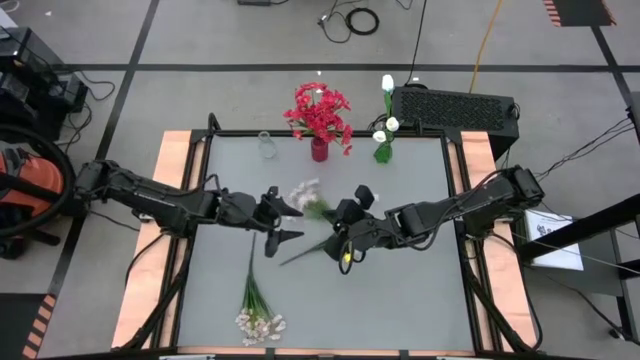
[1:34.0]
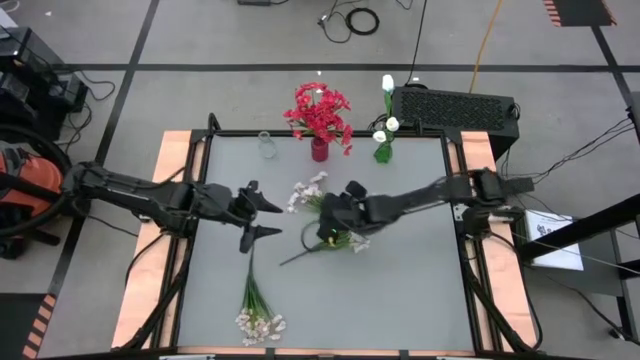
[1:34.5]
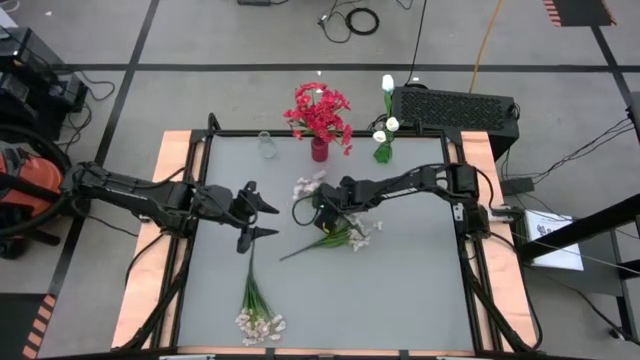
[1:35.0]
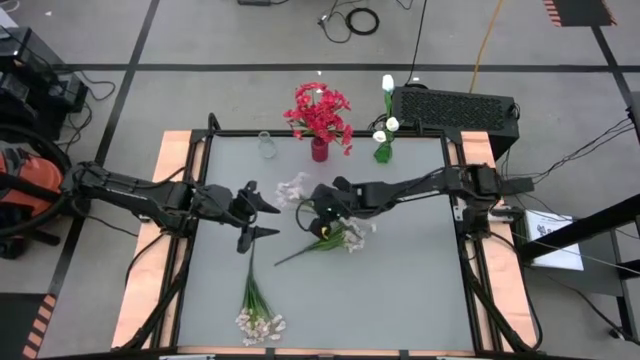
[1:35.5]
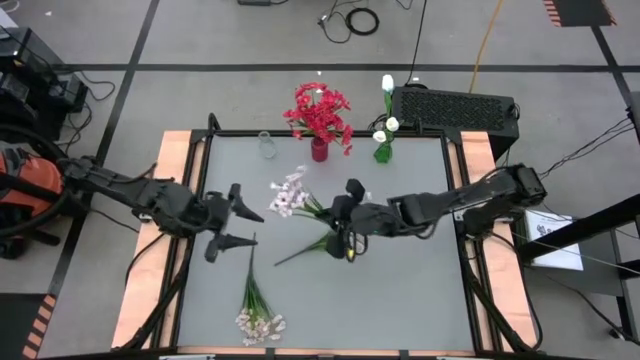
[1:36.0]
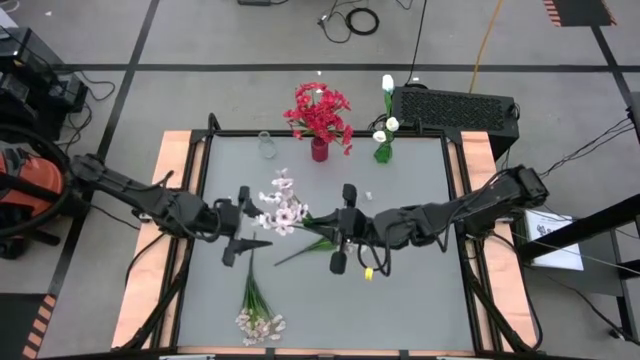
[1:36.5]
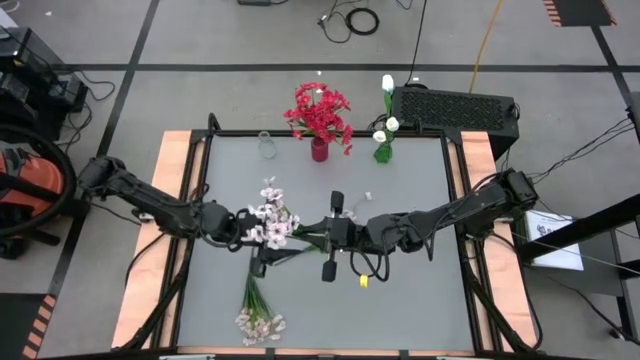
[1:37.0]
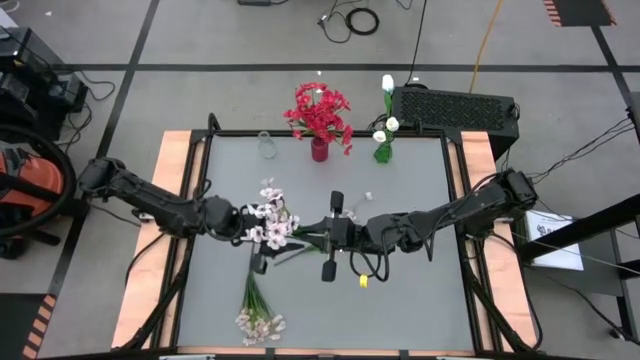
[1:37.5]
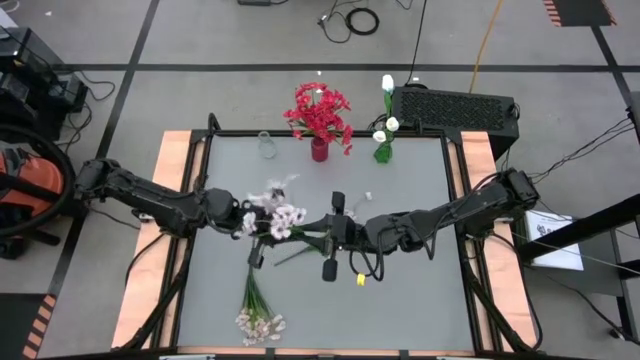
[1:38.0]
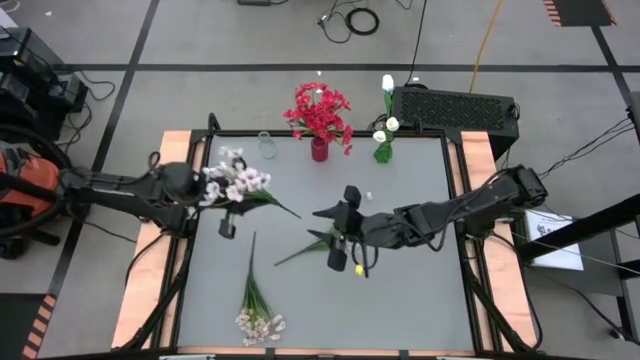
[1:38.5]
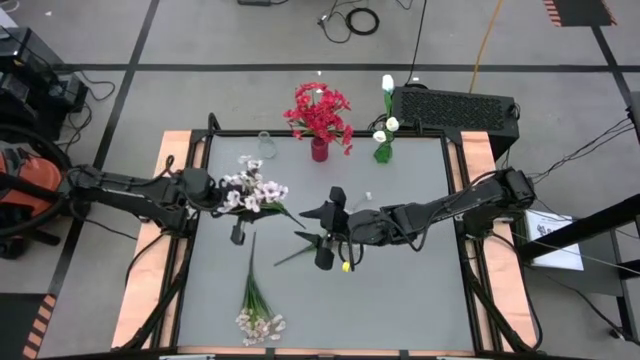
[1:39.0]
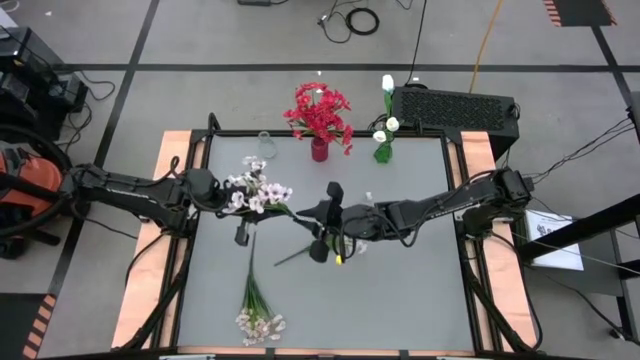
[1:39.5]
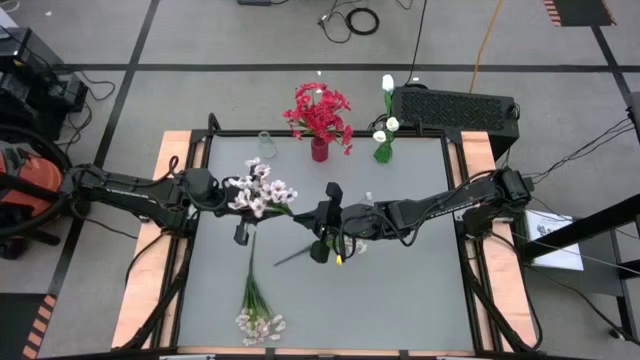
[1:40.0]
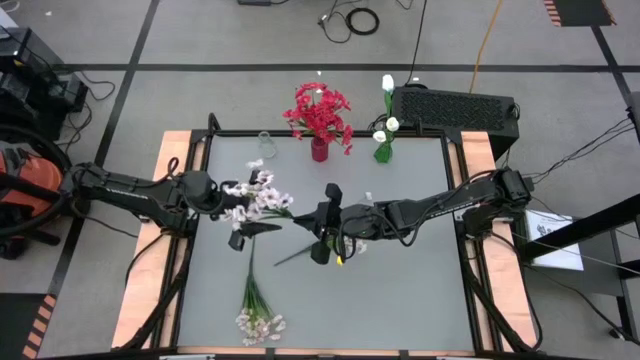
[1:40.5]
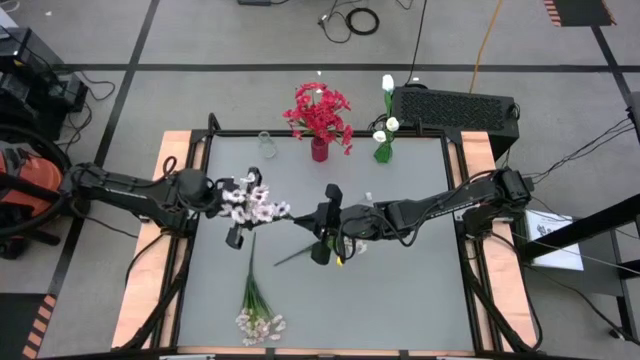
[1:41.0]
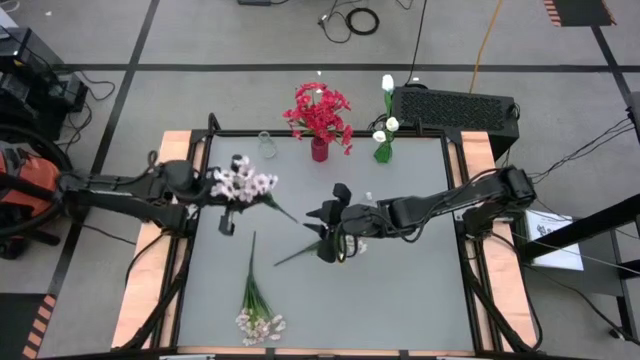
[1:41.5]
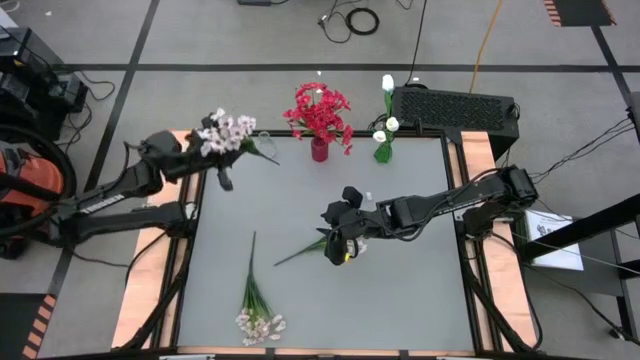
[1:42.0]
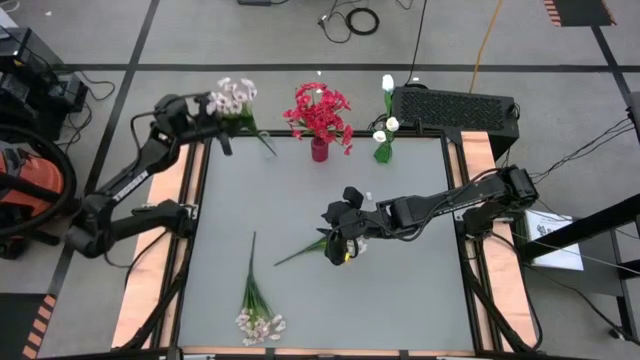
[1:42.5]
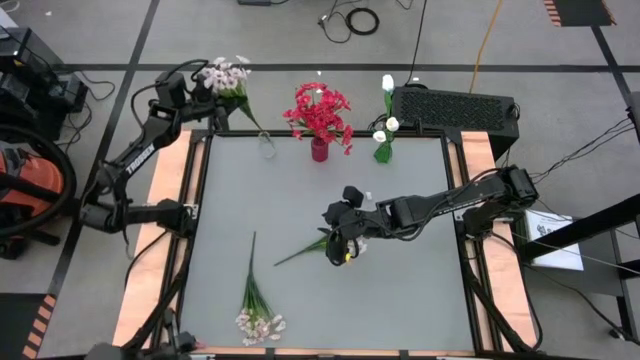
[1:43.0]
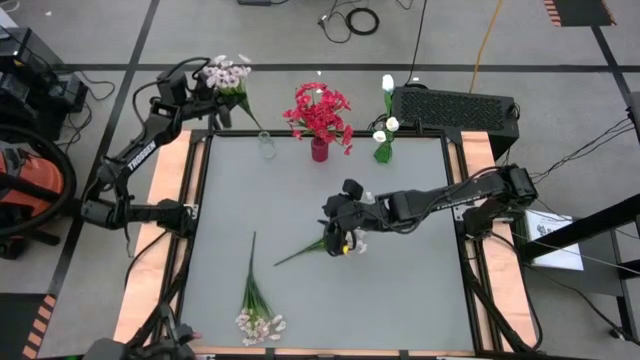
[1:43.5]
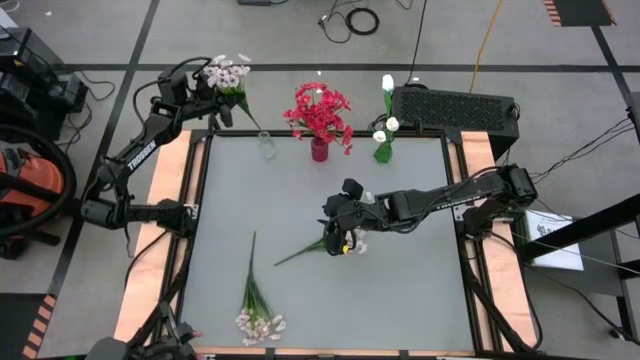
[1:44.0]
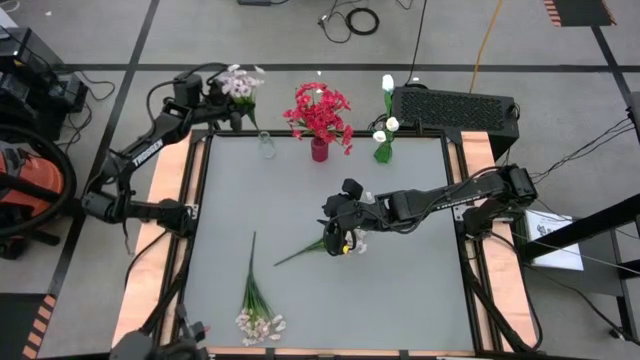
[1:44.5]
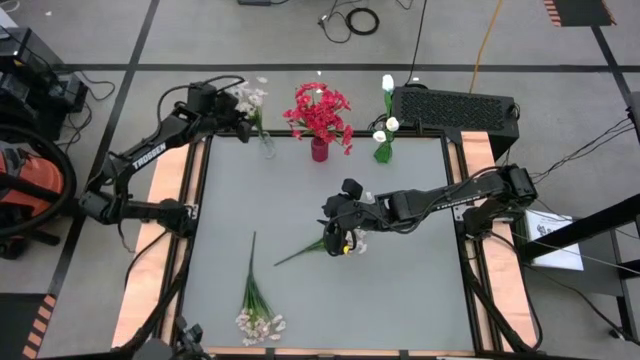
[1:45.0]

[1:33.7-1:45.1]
Task: Sort flowers into vase by color
Put the top white flowers into the transparent vase

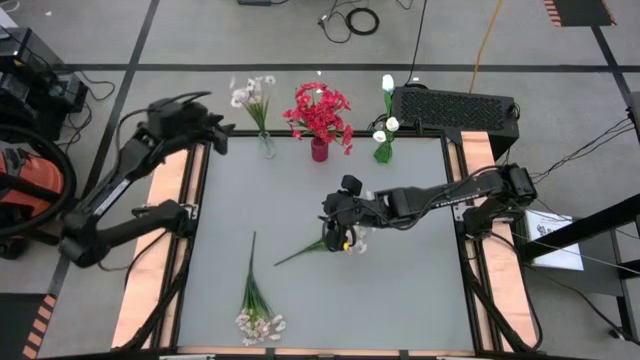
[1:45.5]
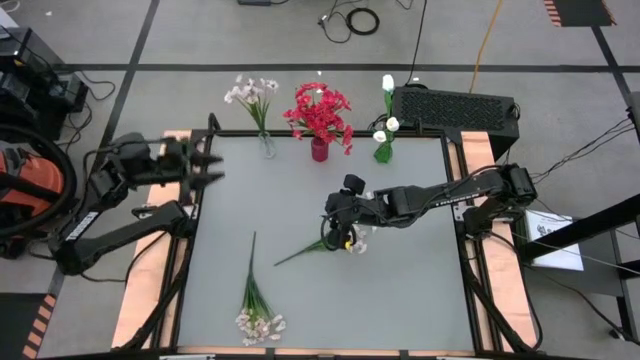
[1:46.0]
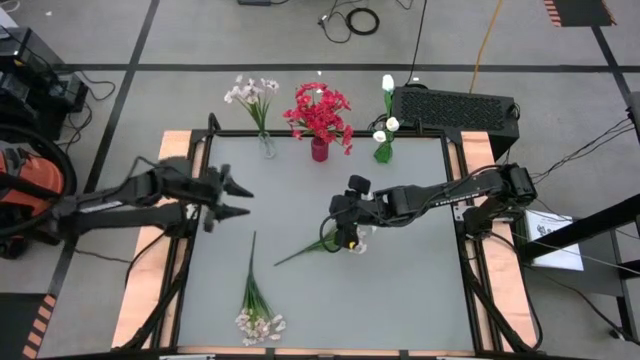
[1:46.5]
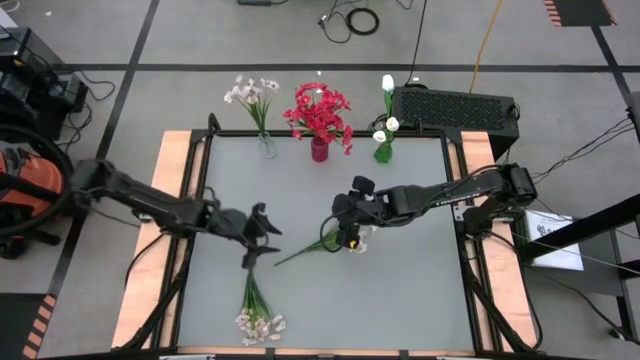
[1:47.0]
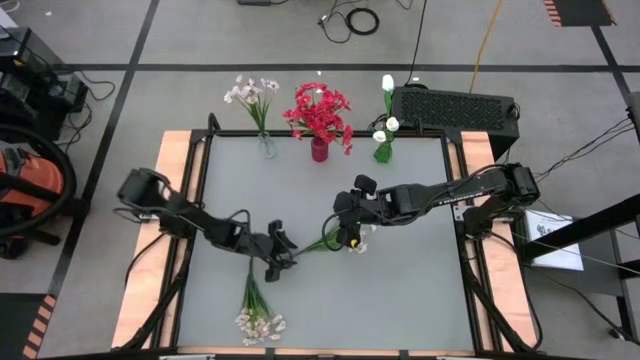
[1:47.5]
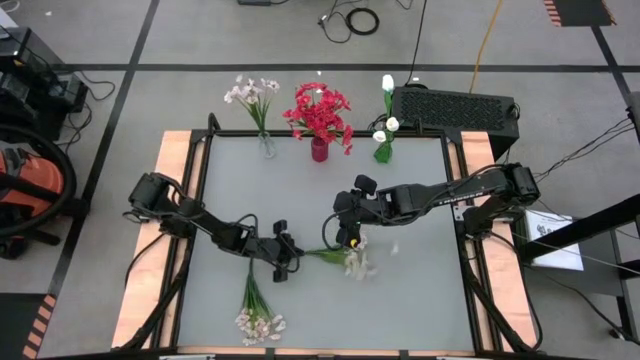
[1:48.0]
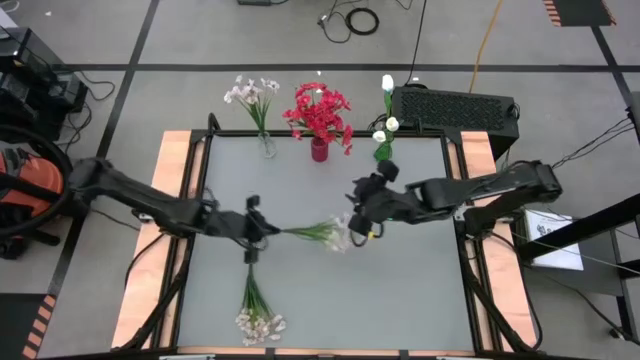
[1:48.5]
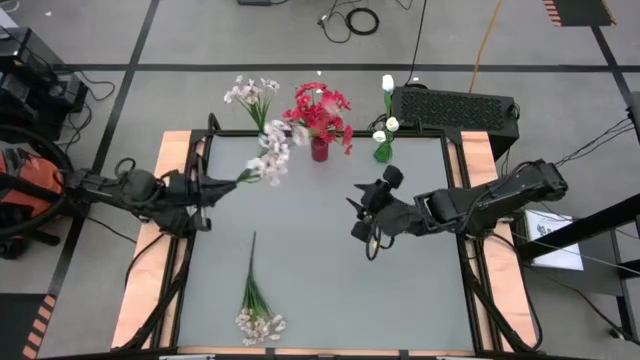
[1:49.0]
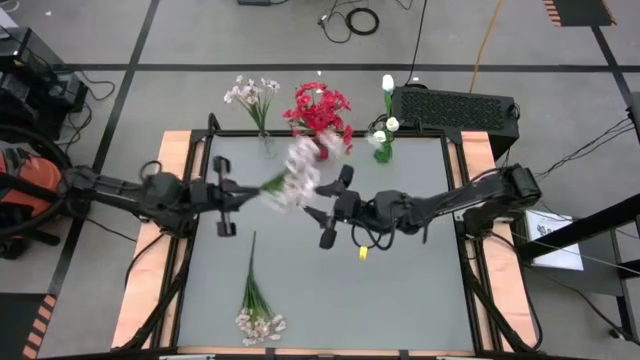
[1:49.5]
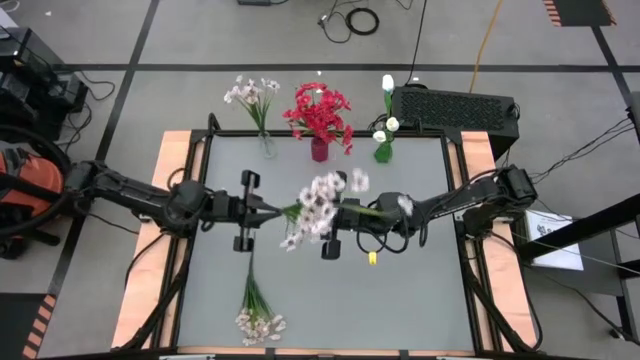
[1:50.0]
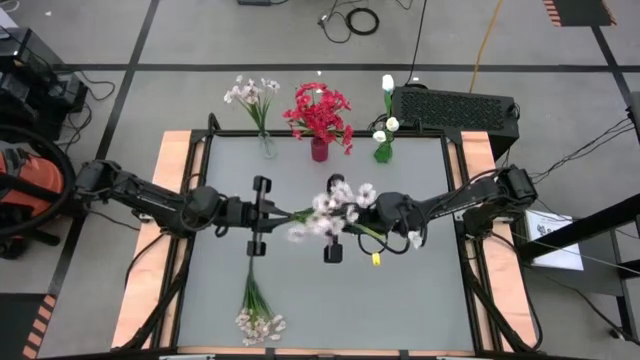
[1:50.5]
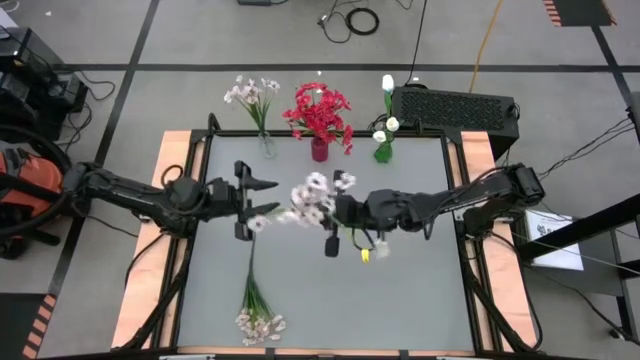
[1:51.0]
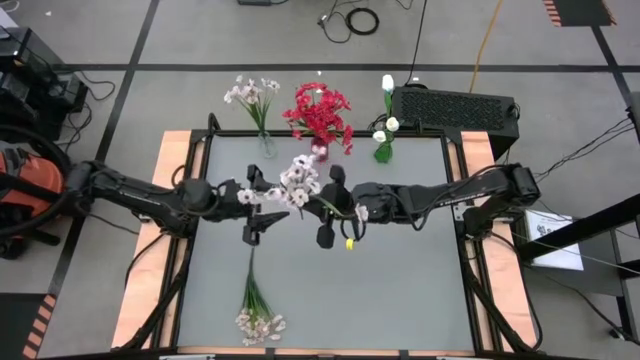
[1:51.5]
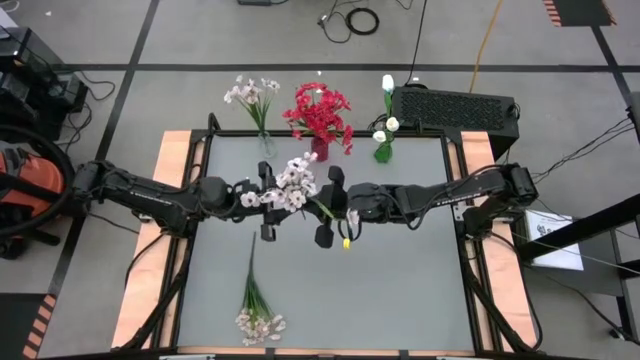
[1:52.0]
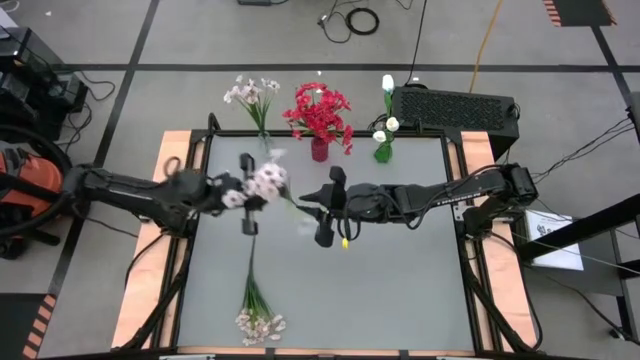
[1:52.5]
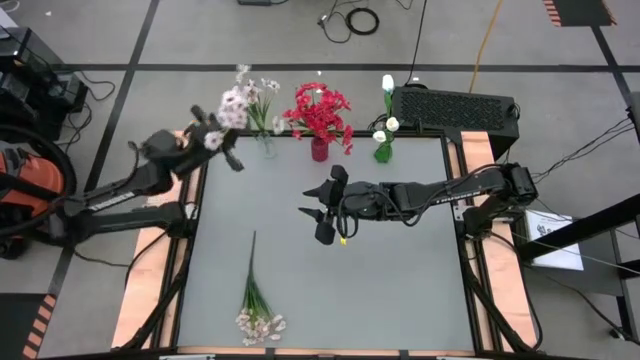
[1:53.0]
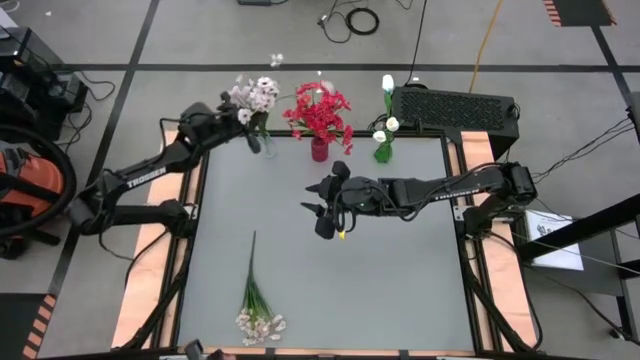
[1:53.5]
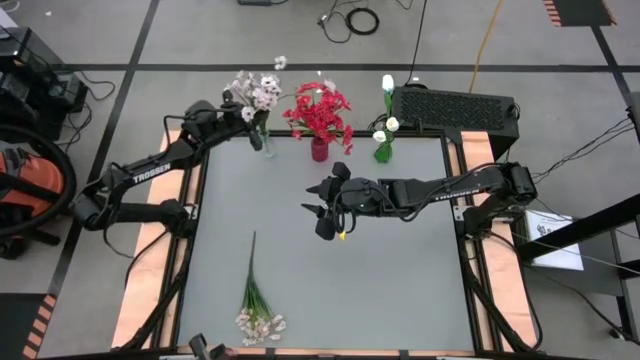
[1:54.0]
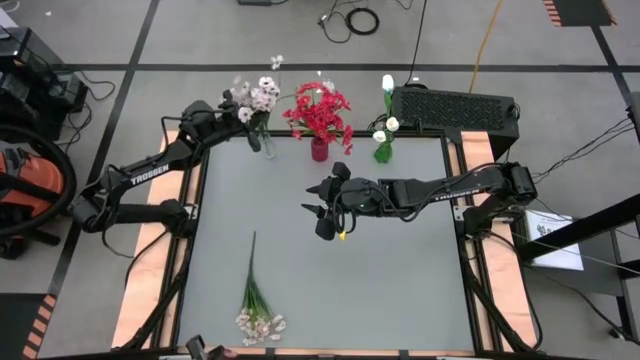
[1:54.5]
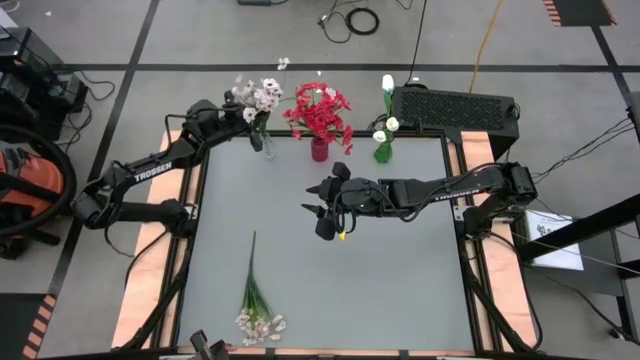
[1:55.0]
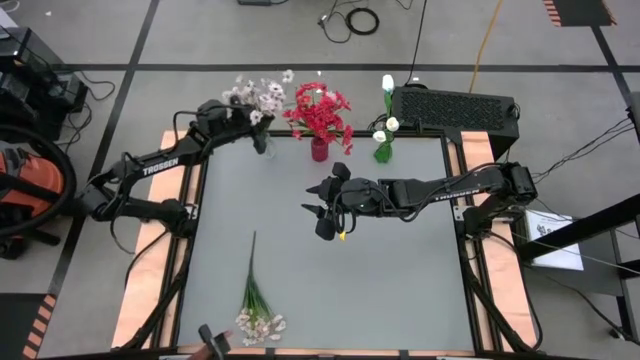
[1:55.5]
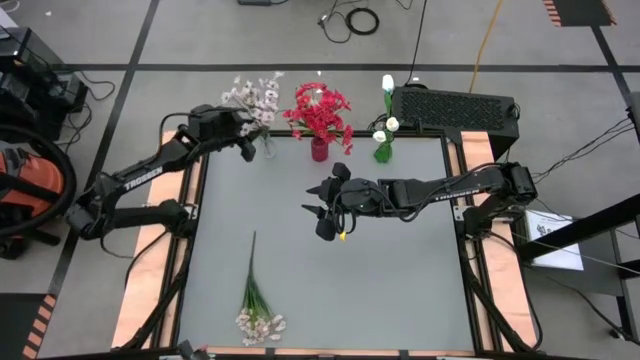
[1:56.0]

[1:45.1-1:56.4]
Put the top white flowers into the transparent vase
